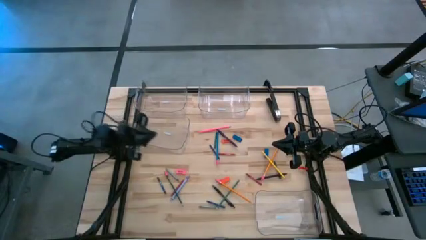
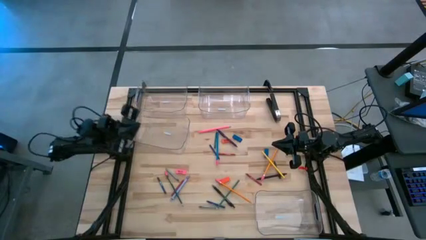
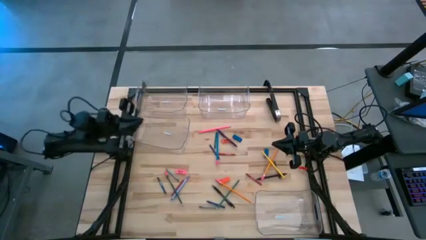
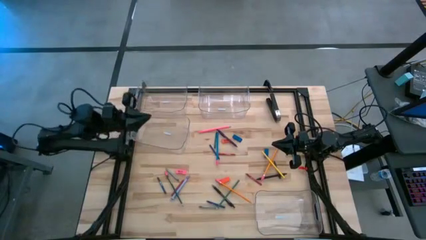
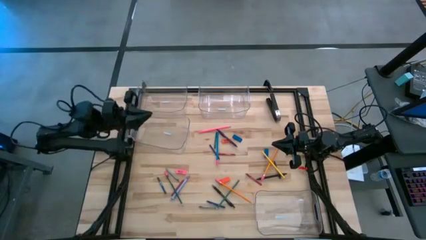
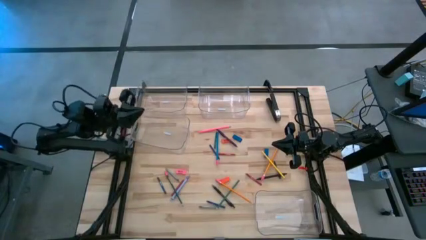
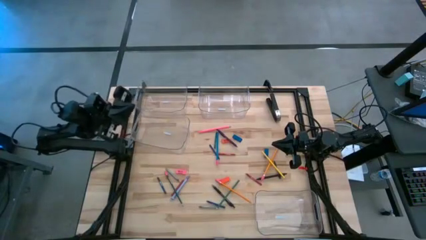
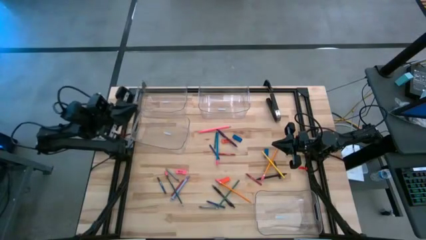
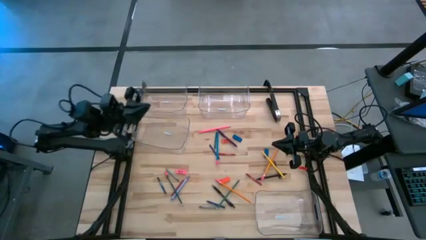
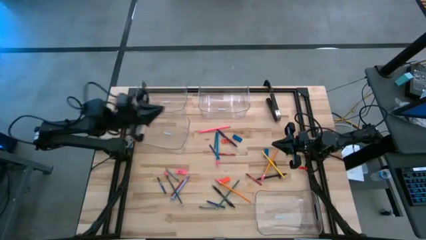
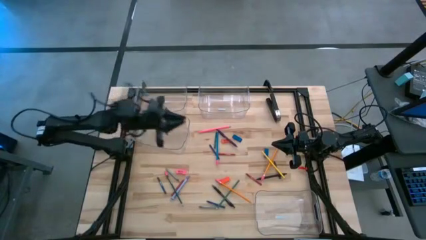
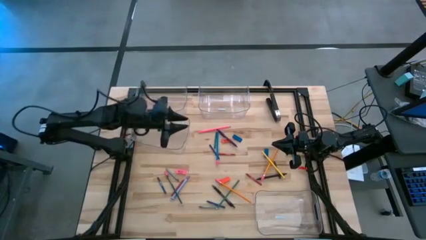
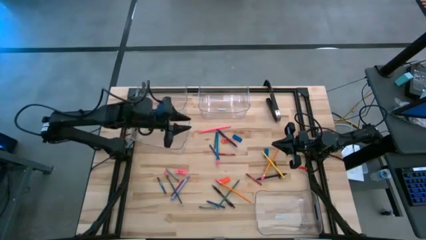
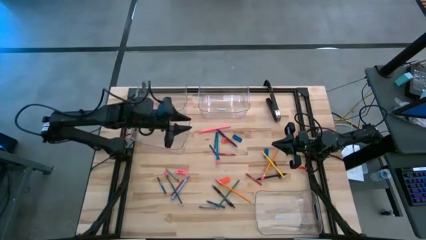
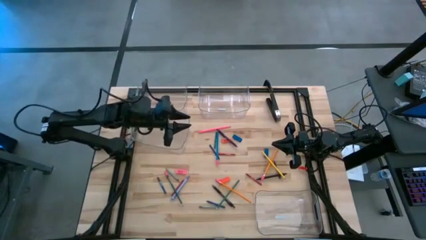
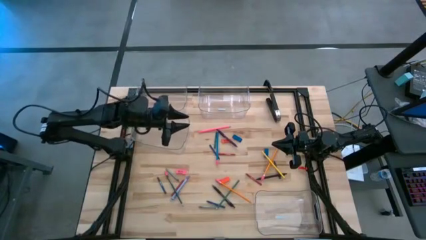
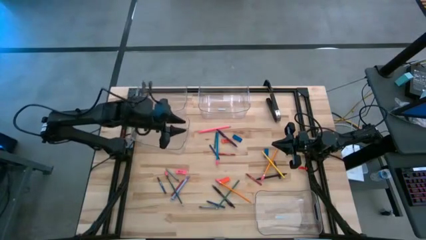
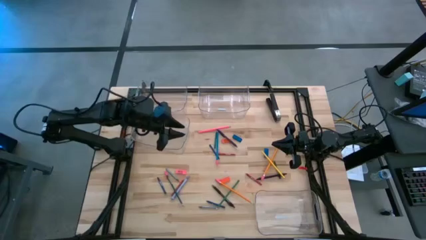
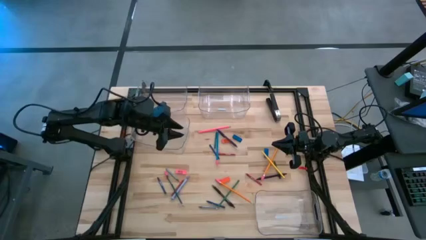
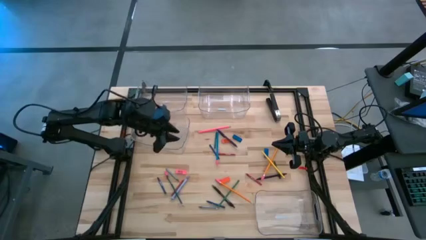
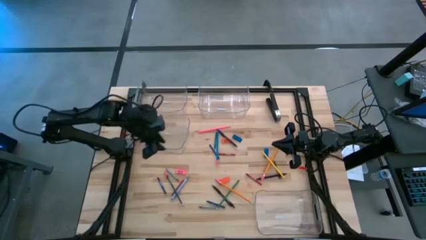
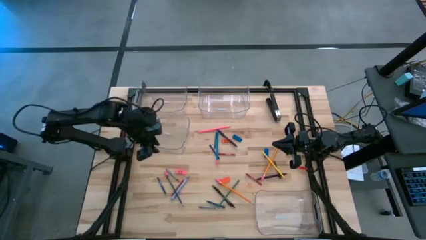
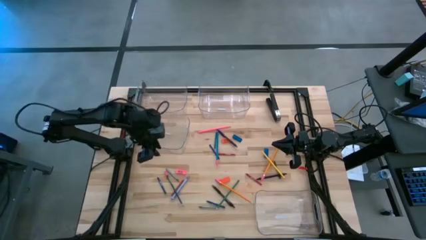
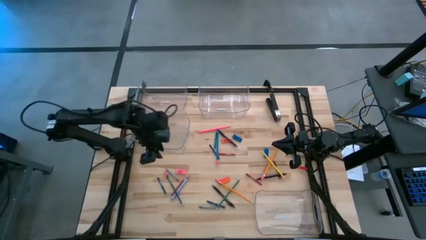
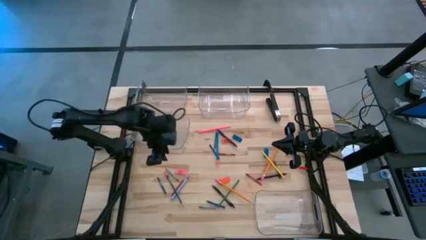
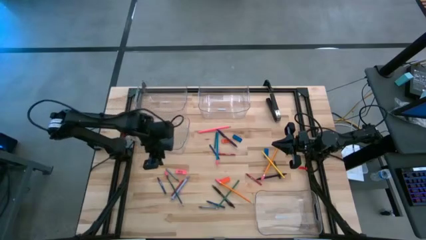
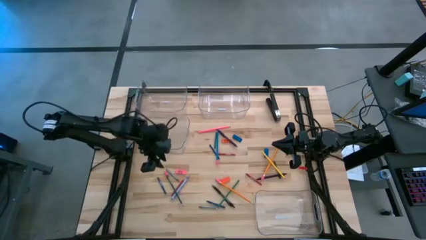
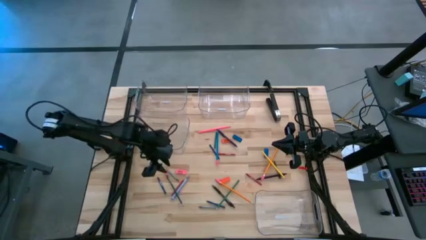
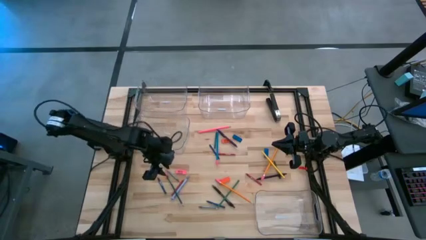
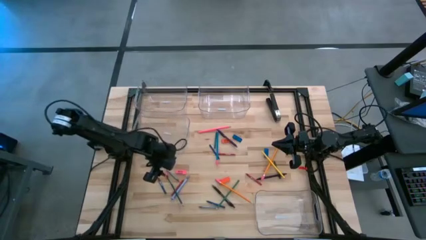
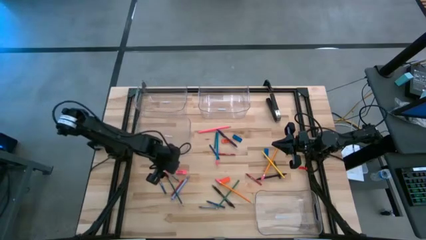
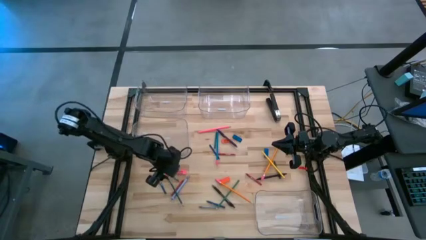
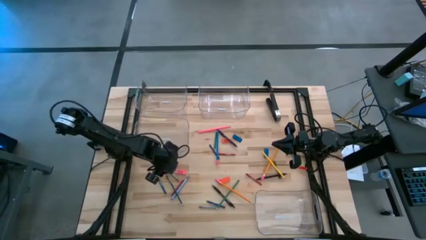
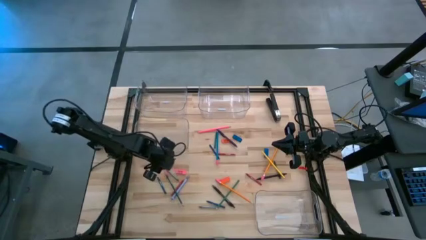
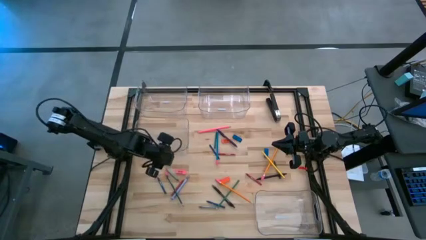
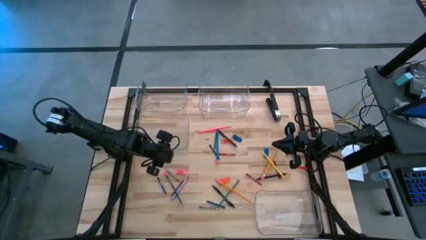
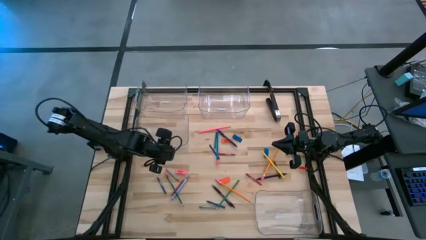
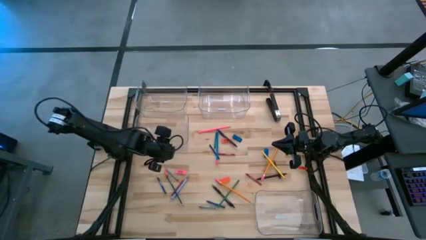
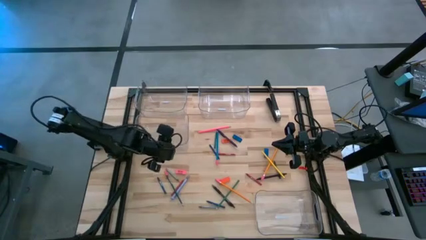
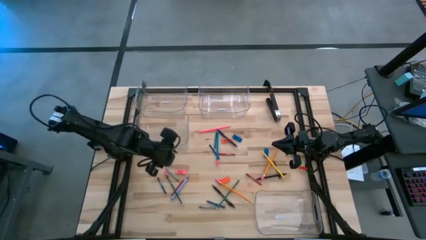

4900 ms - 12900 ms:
Task: Sort crayons/erasers/pens/pencils in bins
Adjust the middle transparent bin

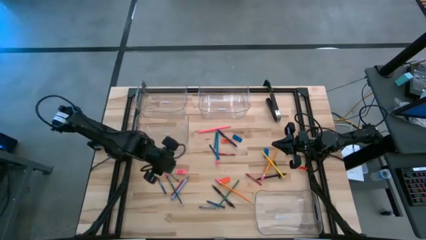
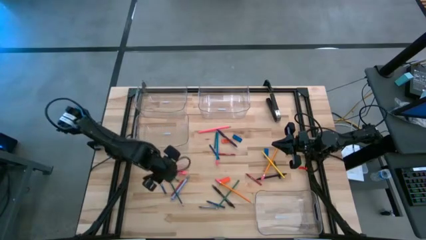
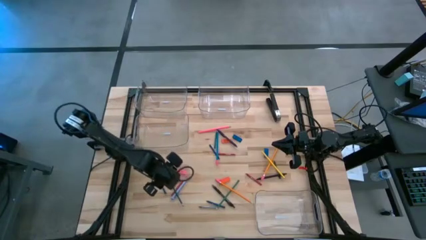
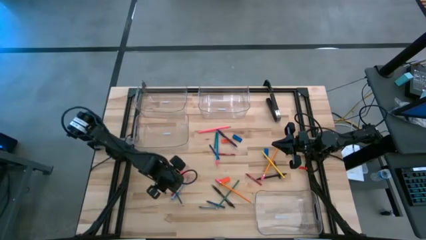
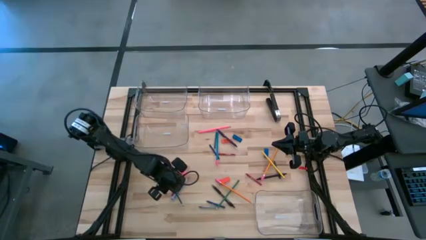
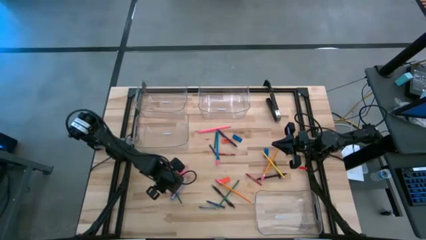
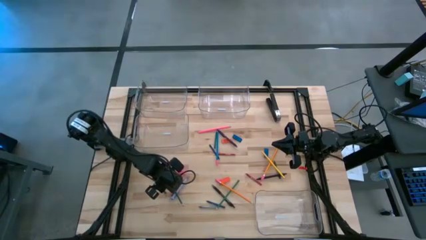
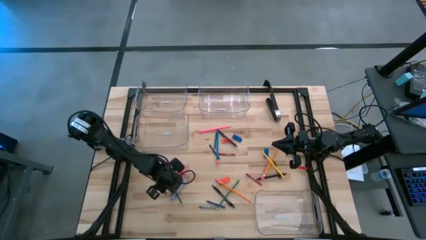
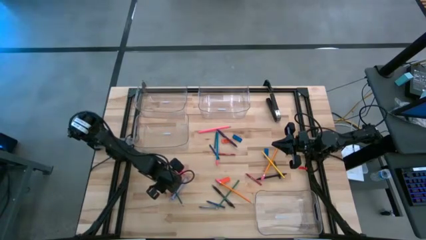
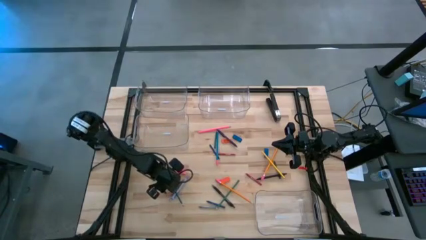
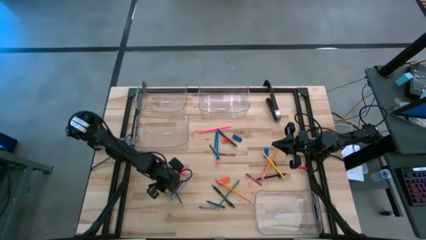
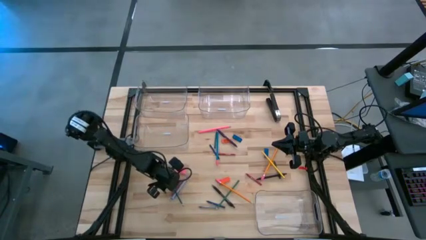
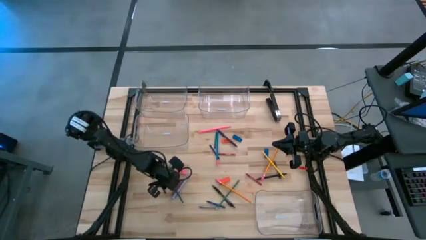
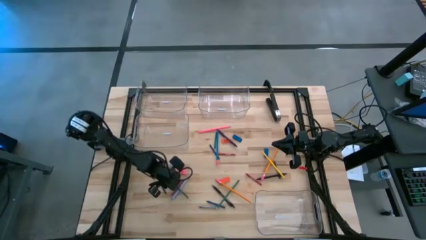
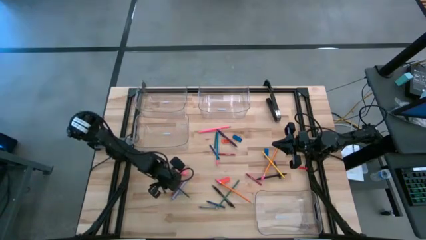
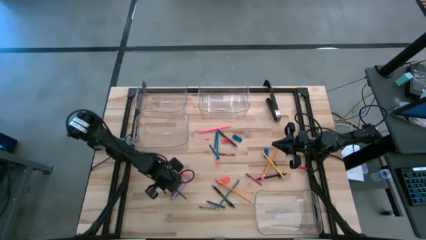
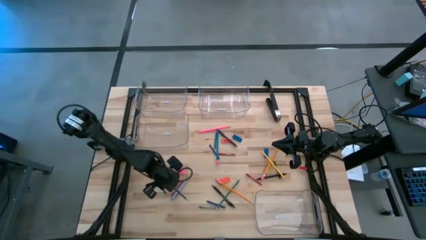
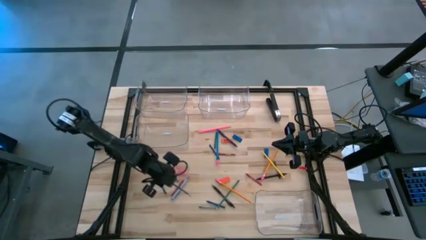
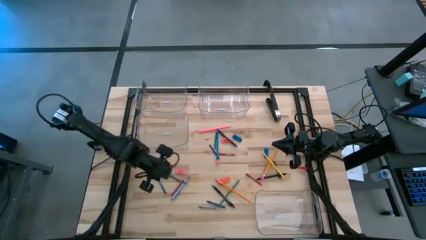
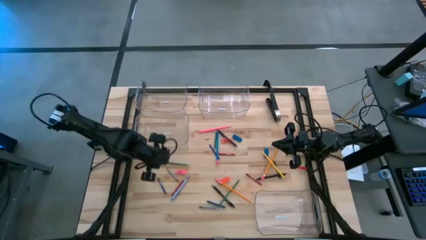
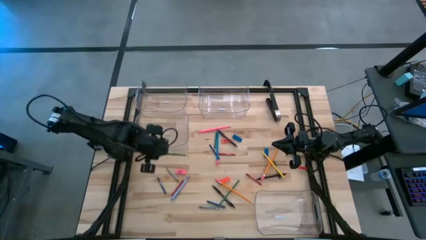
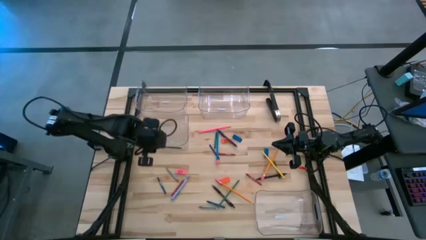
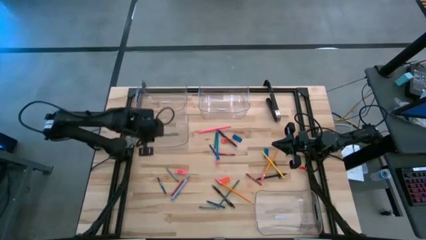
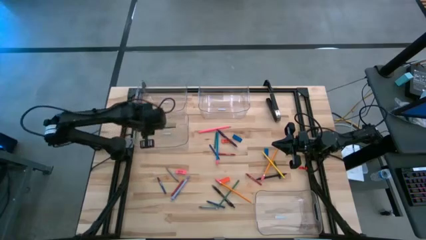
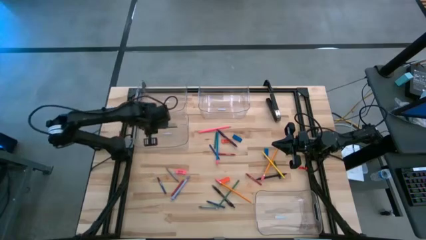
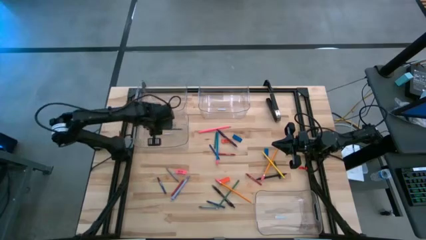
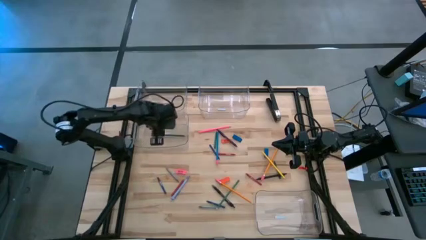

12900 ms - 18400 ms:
Put the green colored pencil into the bottom left transparent bin

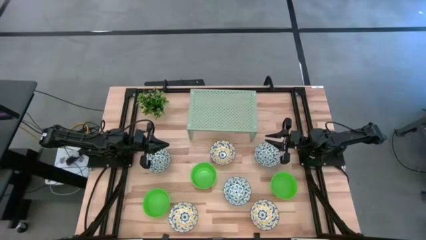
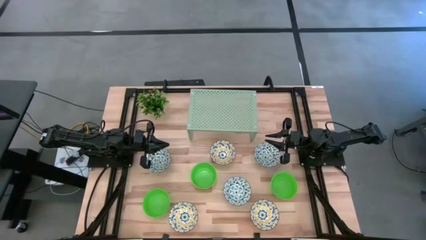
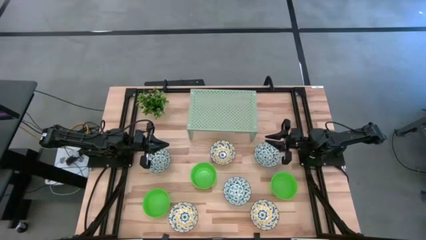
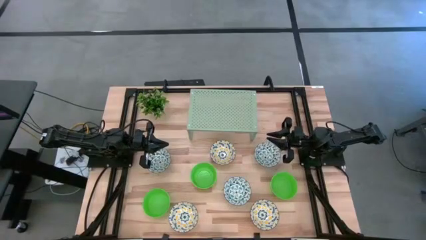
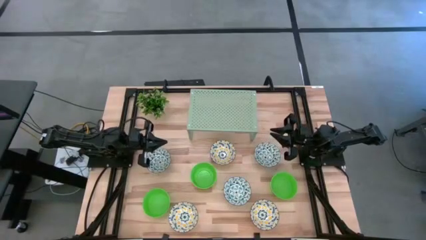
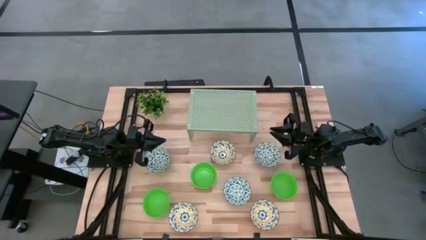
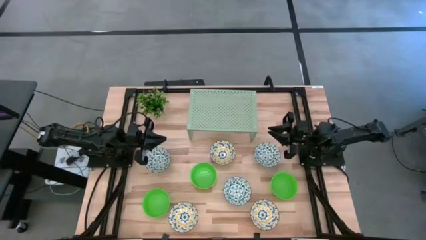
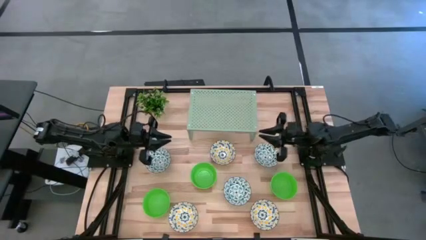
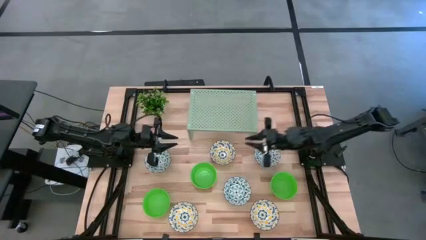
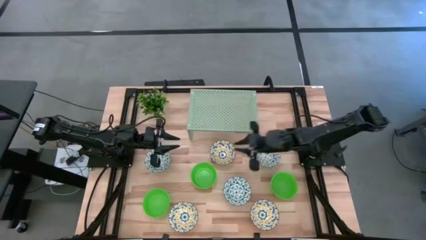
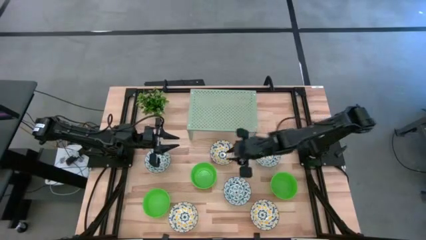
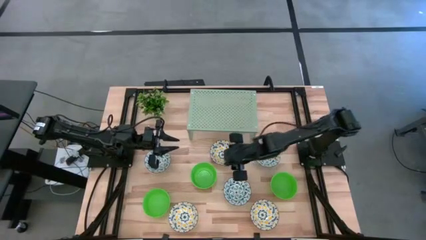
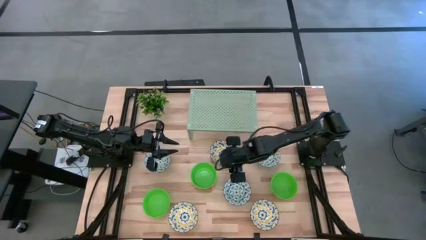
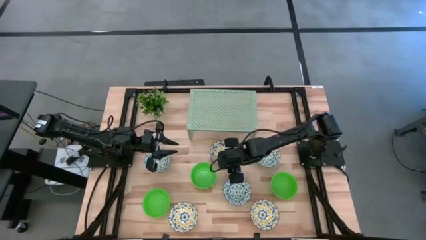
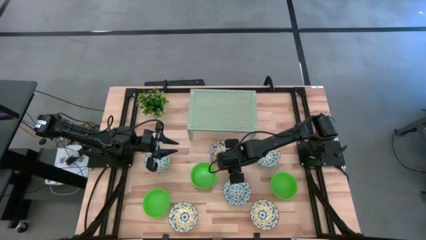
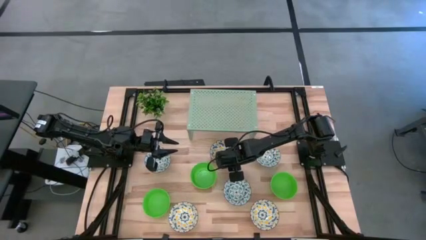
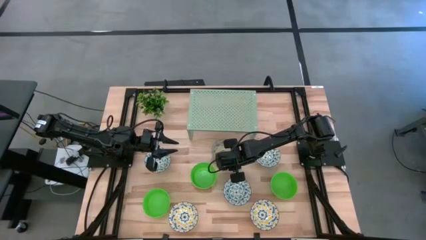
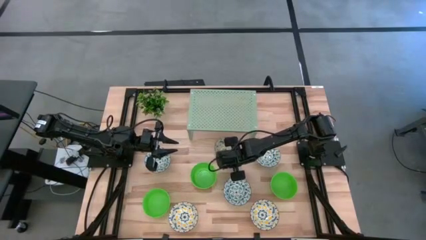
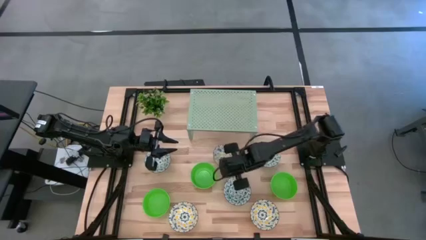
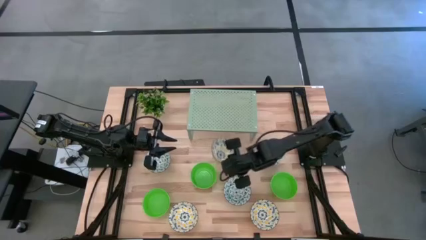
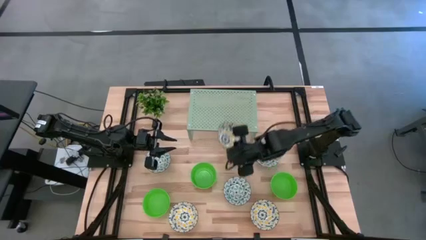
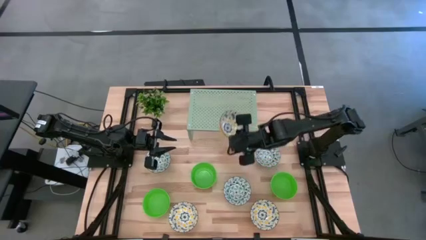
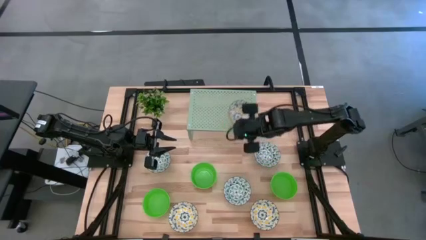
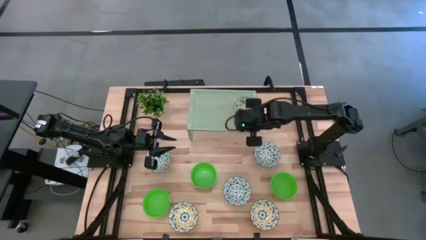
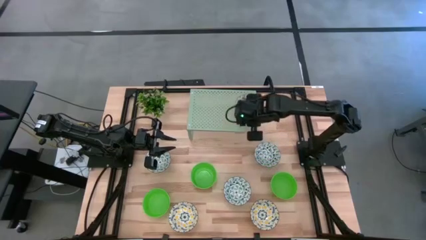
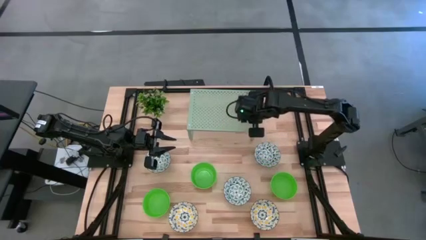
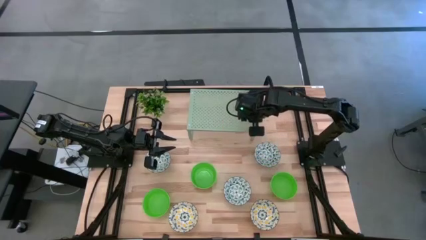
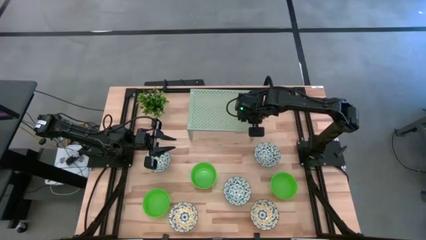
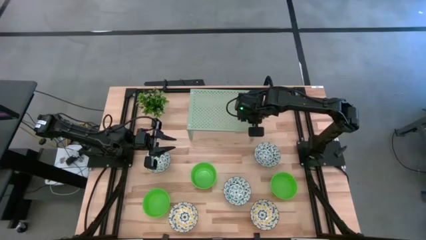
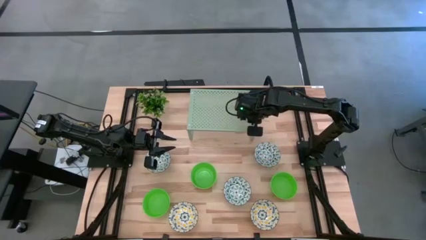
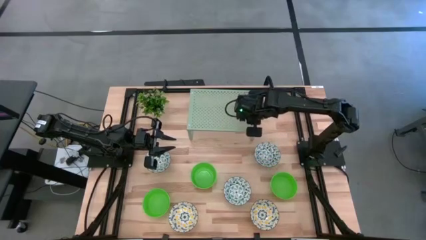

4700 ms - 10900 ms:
Task: Pick & Place Mini bowls
Put the top yellow bowl on the shelf
